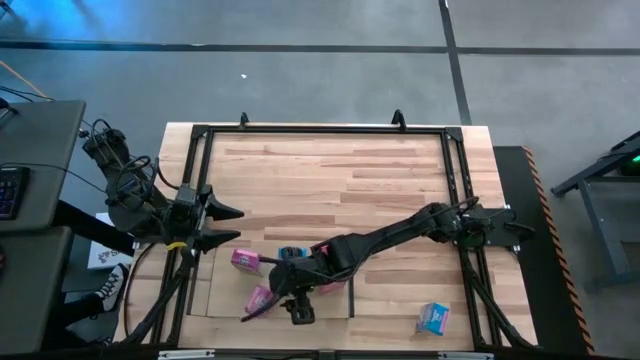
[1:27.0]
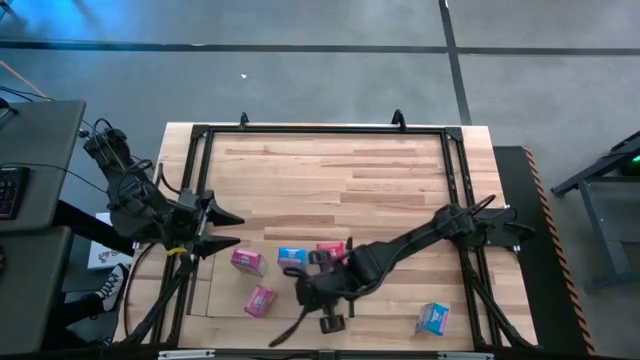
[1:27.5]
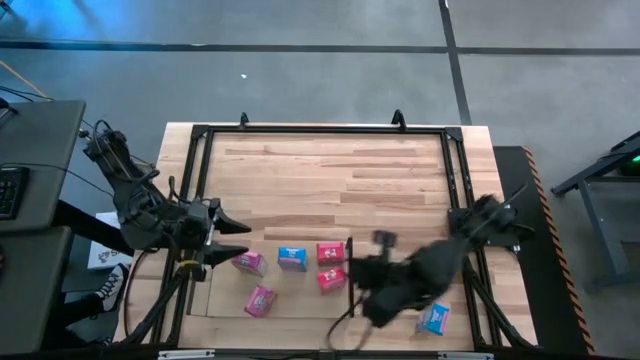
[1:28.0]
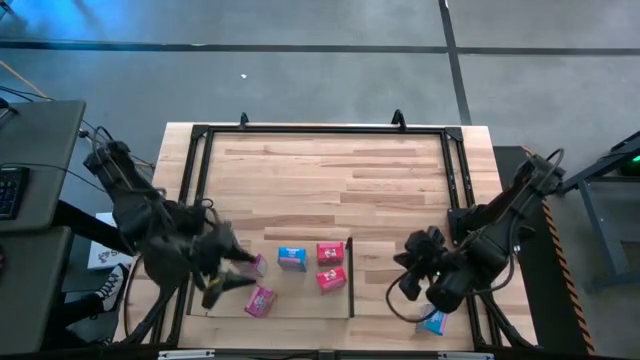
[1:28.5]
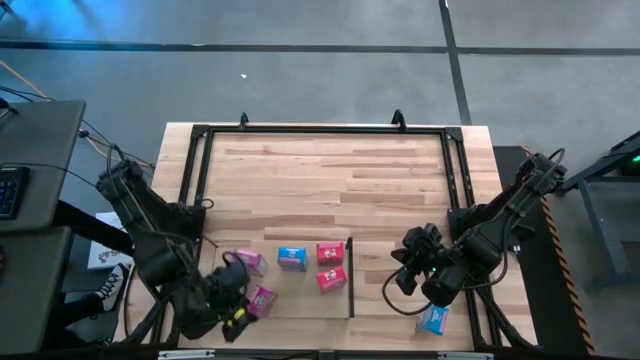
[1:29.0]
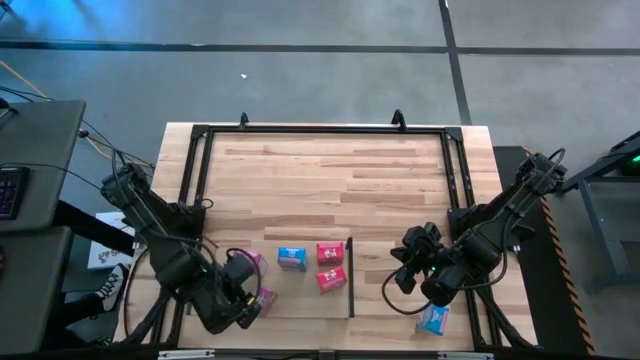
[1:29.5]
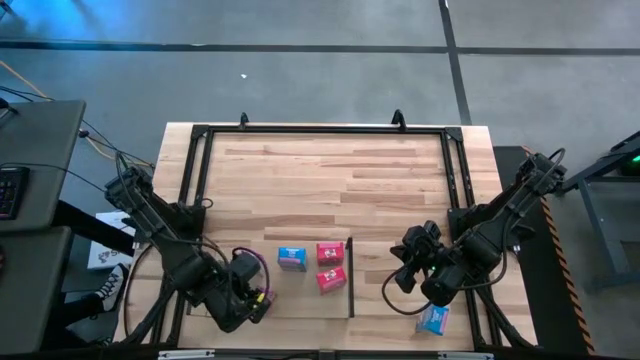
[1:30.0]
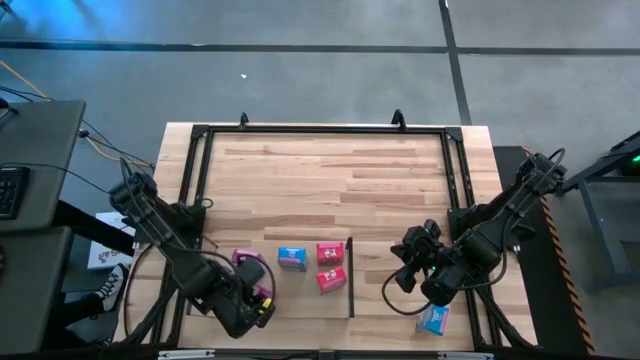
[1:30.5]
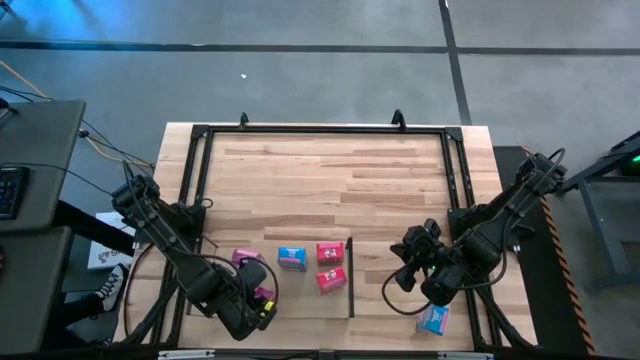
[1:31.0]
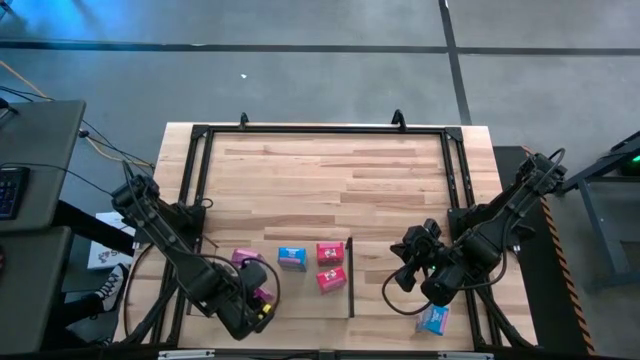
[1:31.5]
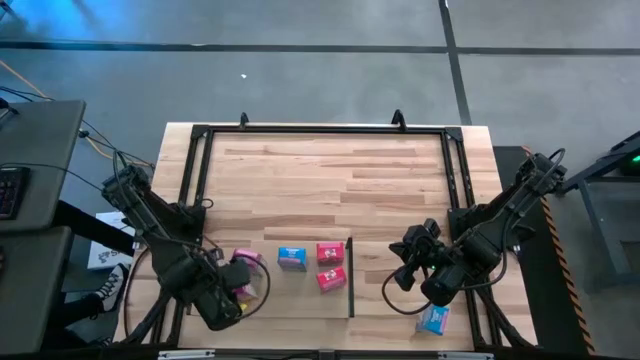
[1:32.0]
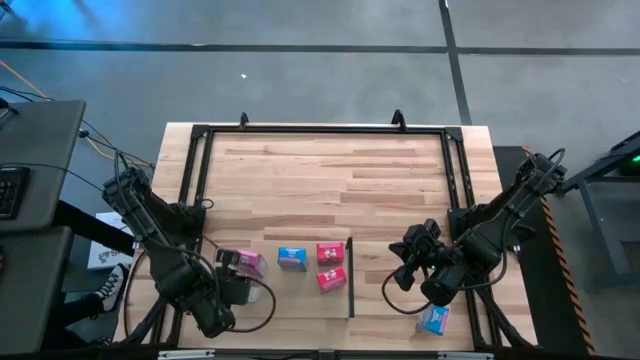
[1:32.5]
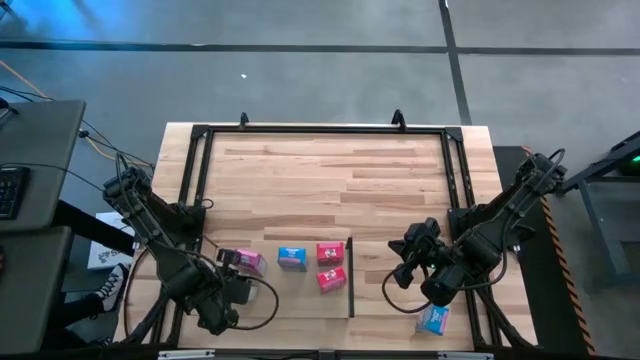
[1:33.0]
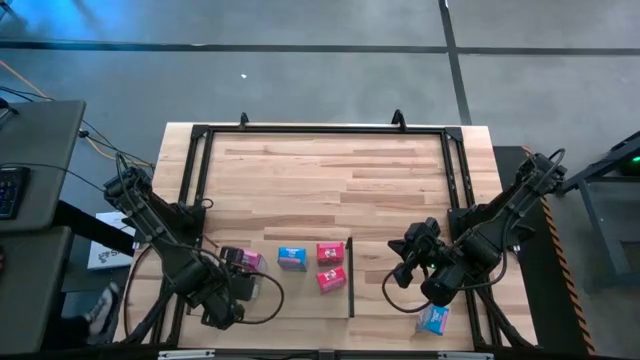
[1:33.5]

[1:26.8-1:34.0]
Task: Stack cereal on shelf
Adjust the purple cereal box

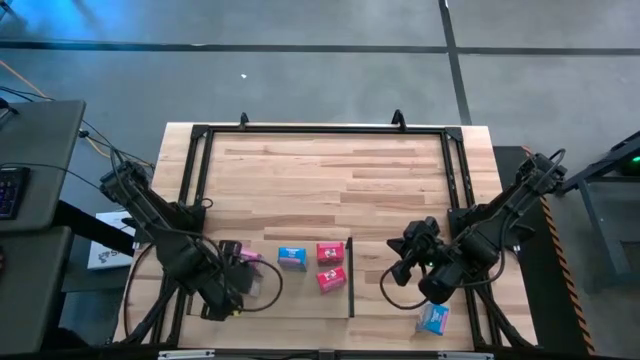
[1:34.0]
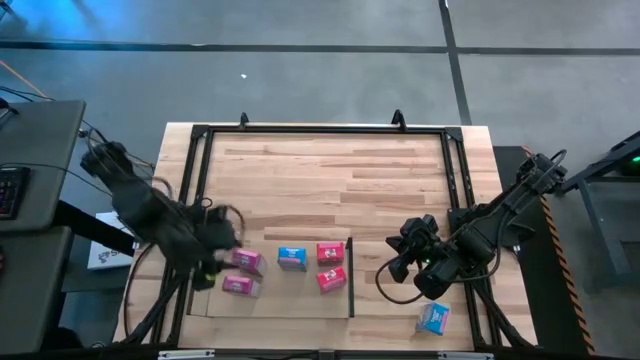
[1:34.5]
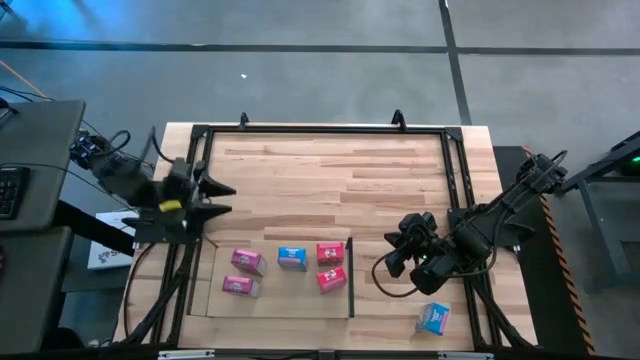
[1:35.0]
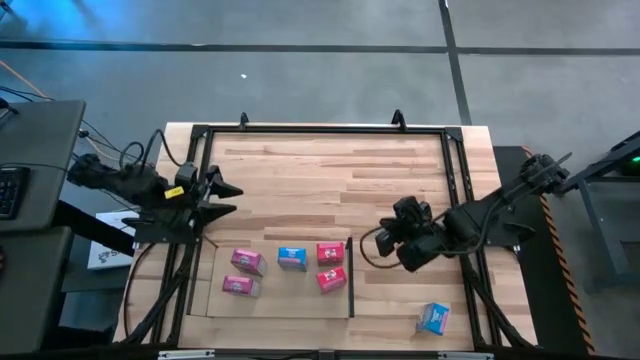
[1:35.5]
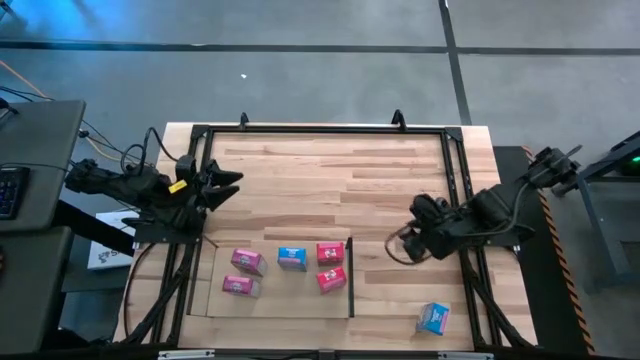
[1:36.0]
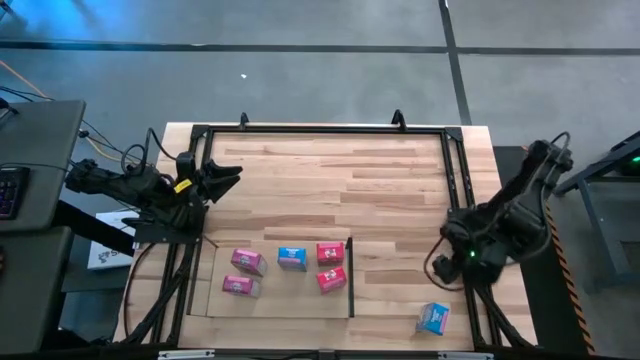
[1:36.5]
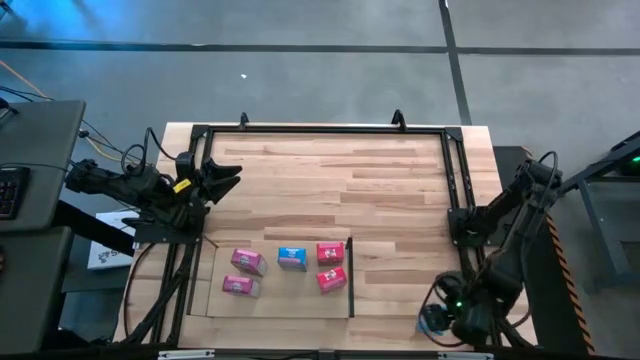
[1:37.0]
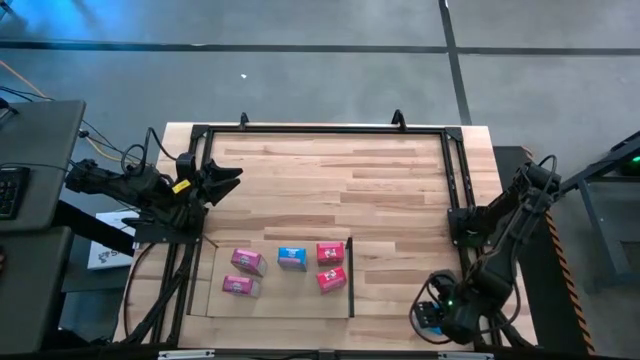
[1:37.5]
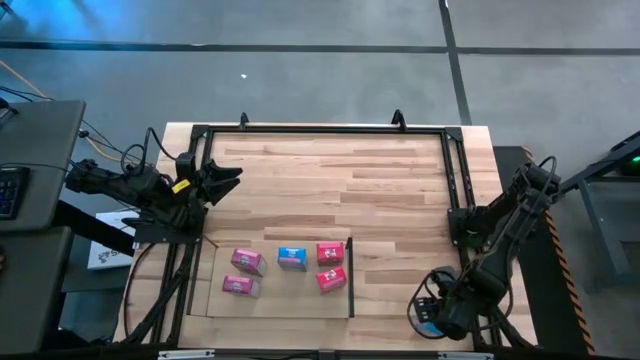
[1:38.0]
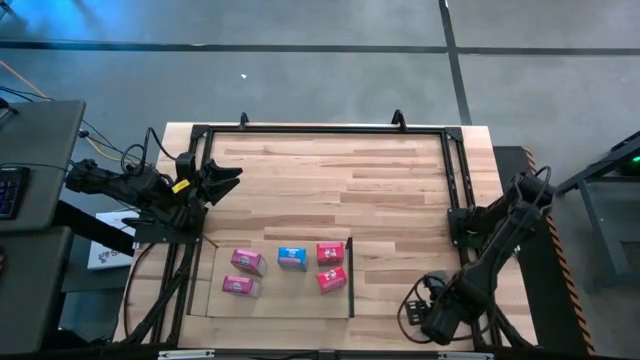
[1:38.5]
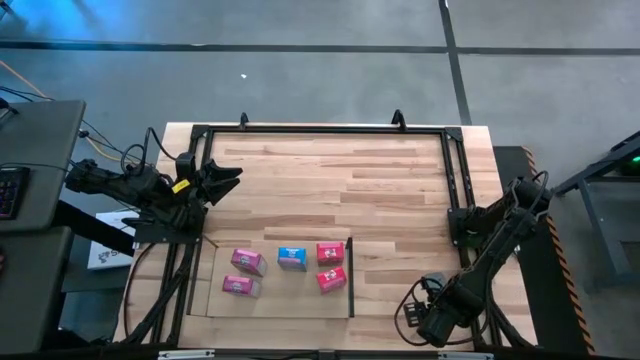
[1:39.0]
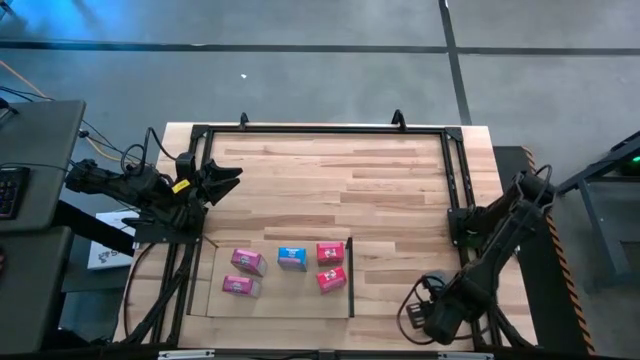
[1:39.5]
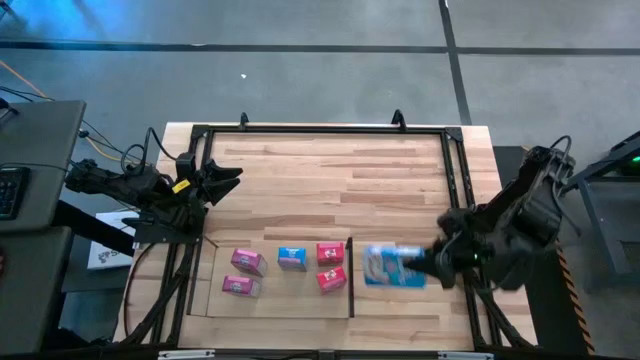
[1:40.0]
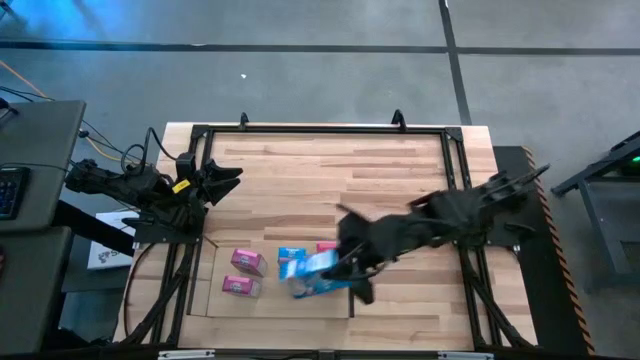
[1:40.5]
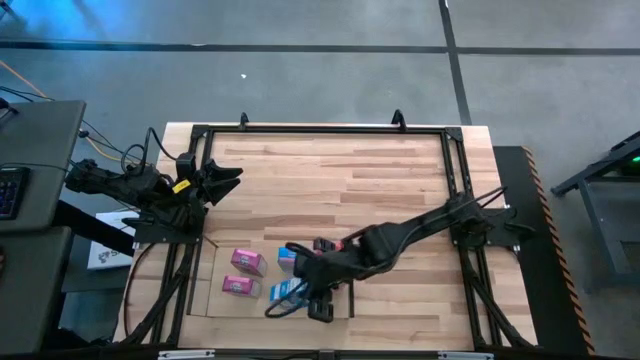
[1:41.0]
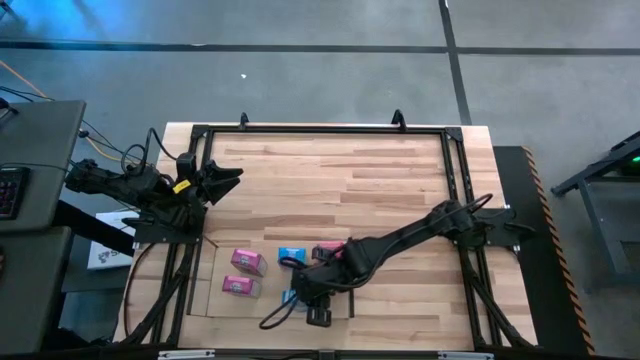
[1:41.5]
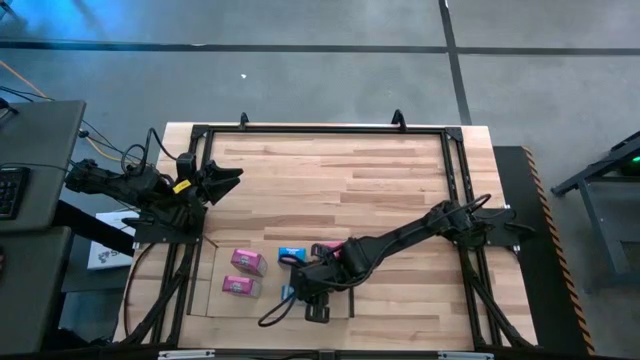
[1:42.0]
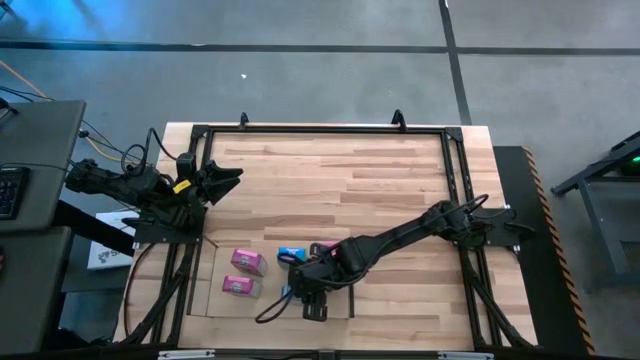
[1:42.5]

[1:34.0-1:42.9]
Put the blue cereal box on the shelf

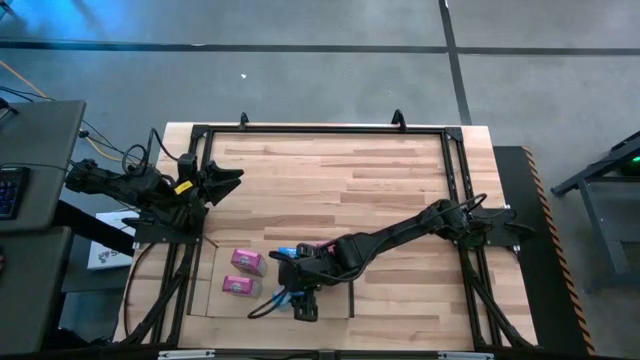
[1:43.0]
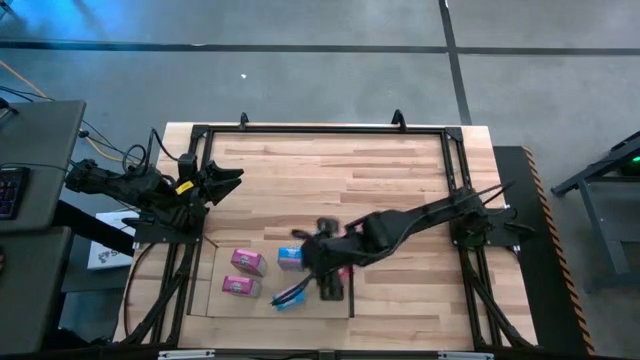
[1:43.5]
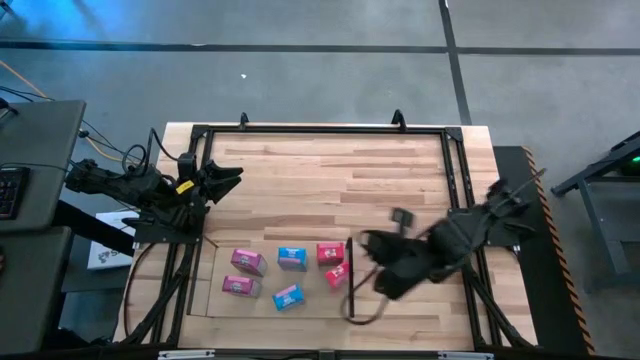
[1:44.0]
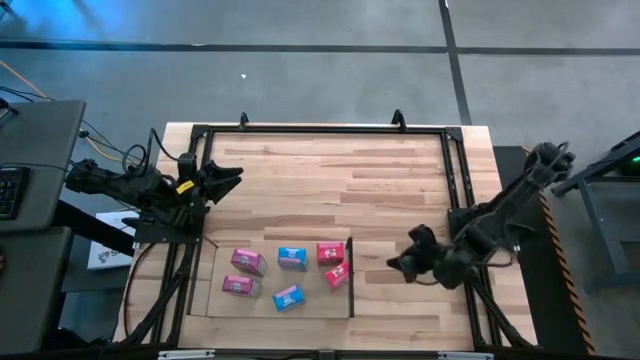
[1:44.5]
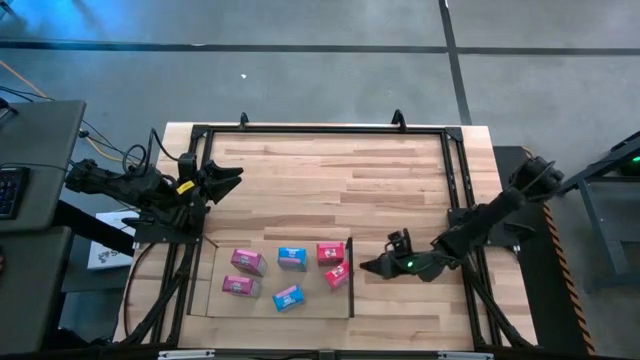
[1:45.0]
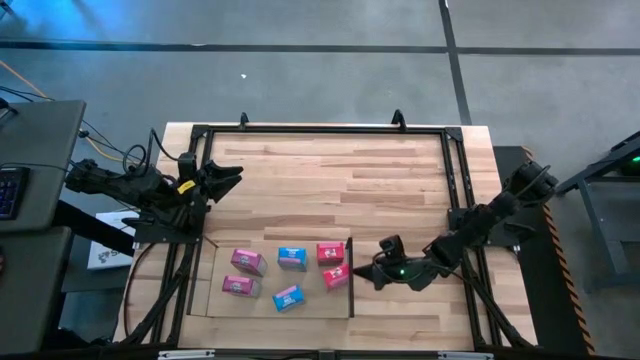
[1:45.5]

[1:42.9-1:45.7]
Adjust the red cereal box on the shelf

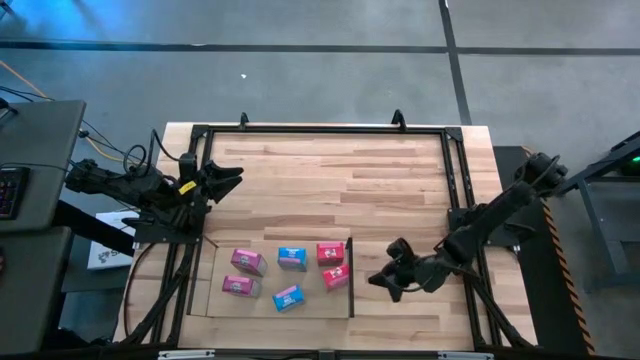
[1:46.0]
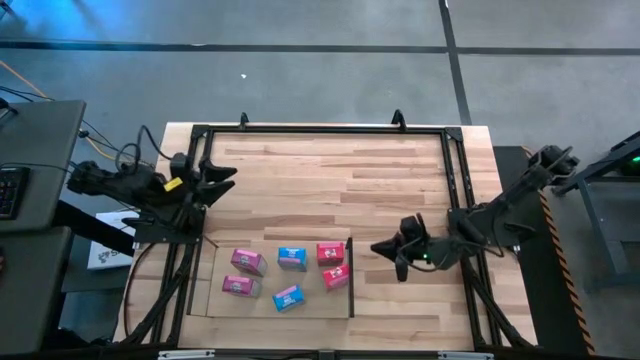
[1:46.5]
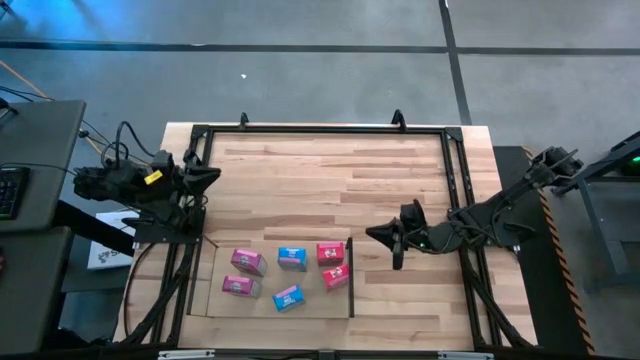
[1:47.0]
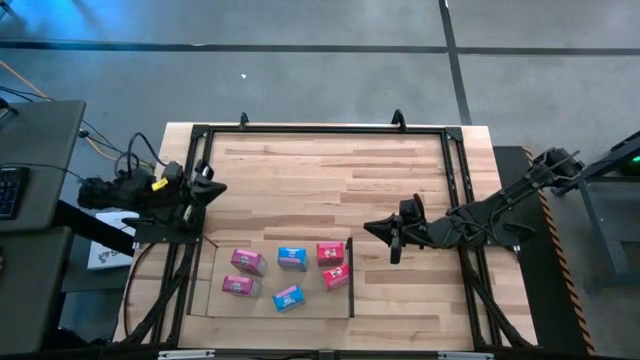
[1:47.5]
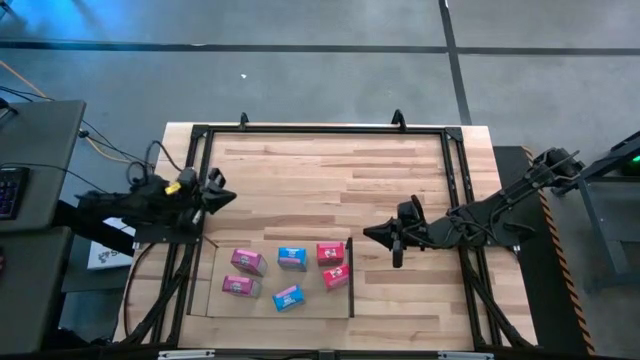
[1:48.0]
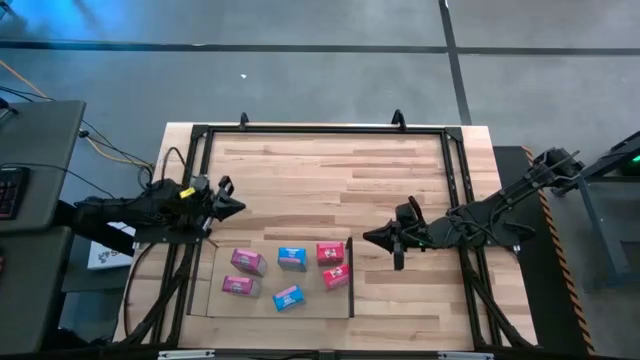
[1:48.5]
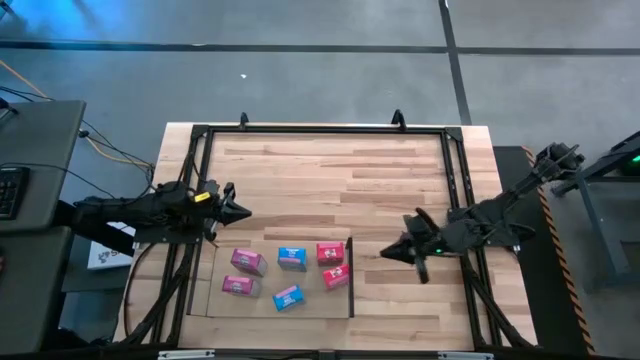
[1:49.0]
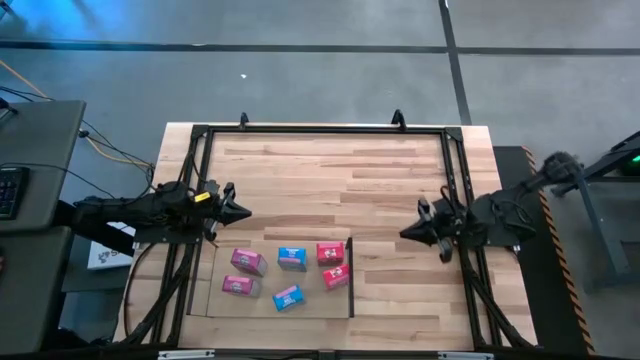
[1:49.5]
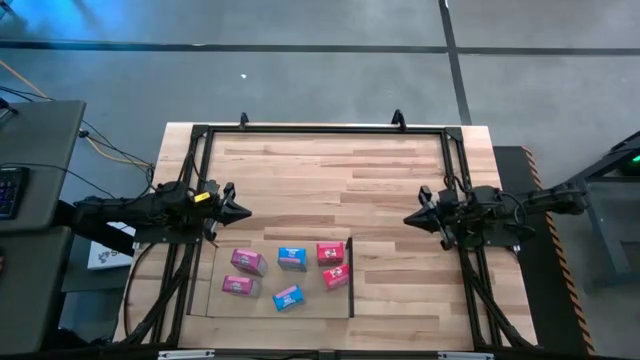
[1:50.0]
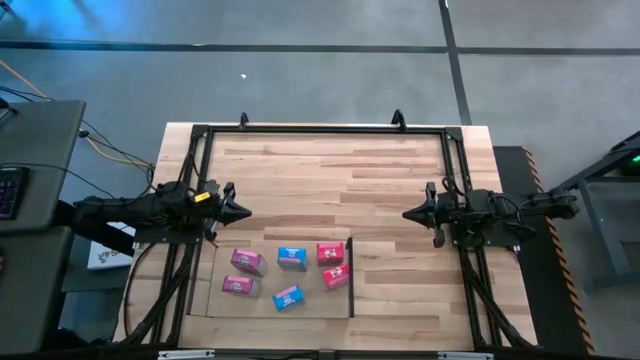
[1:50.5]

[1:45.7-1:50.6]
Return to Home Position
